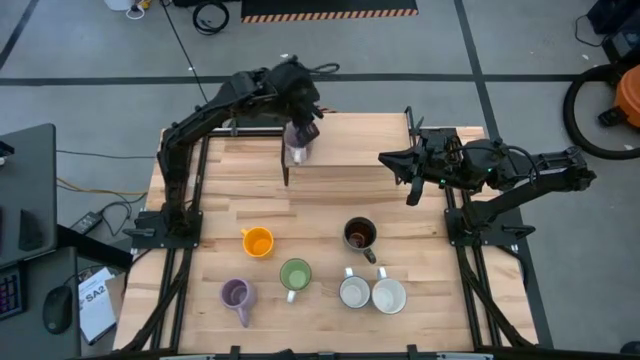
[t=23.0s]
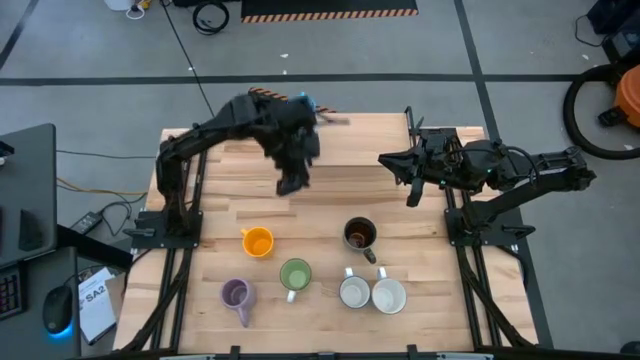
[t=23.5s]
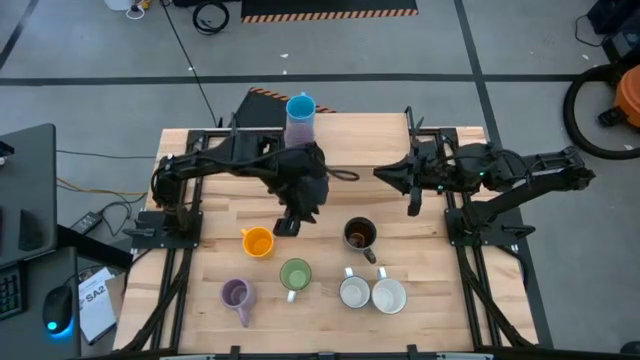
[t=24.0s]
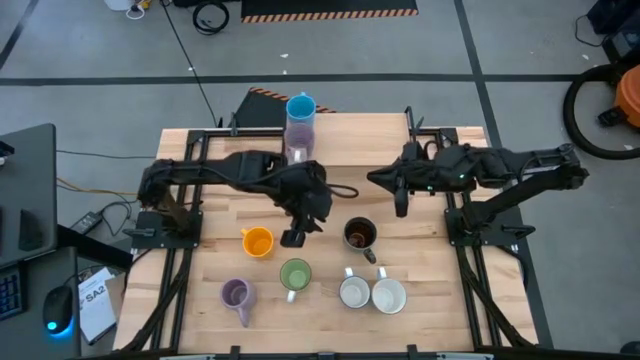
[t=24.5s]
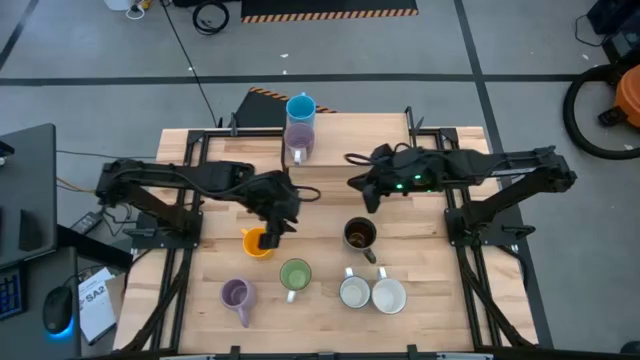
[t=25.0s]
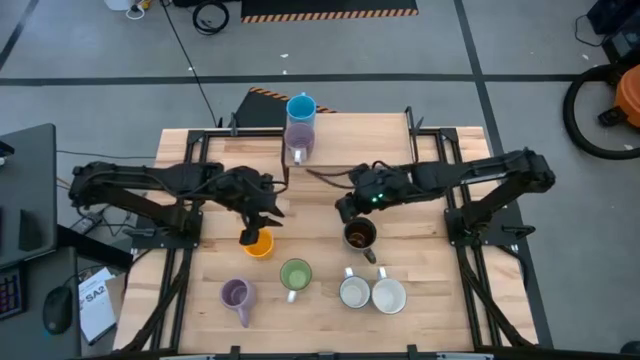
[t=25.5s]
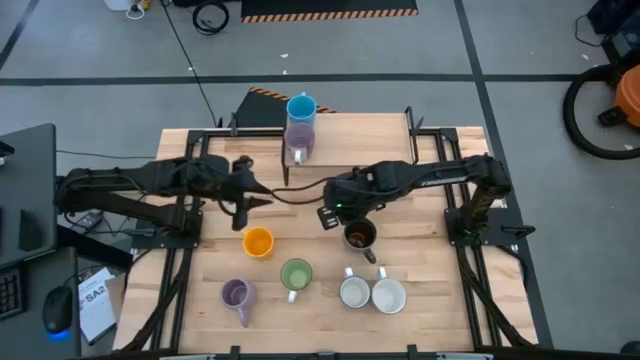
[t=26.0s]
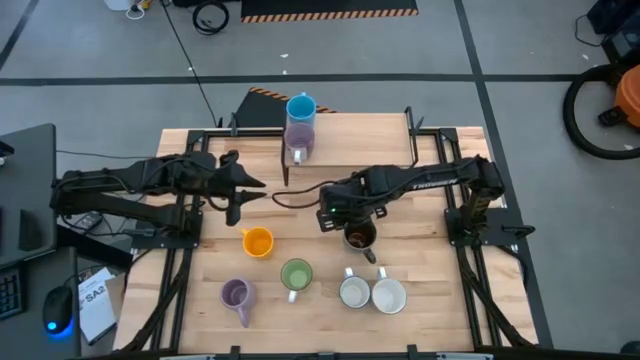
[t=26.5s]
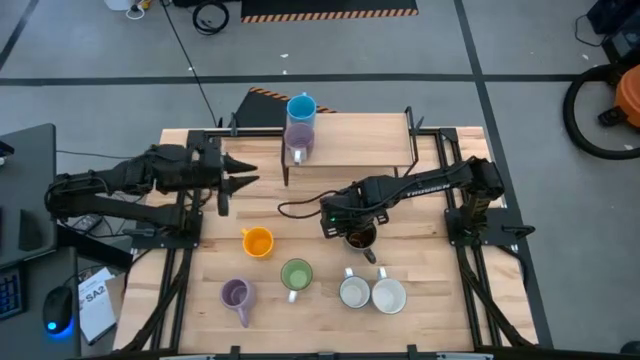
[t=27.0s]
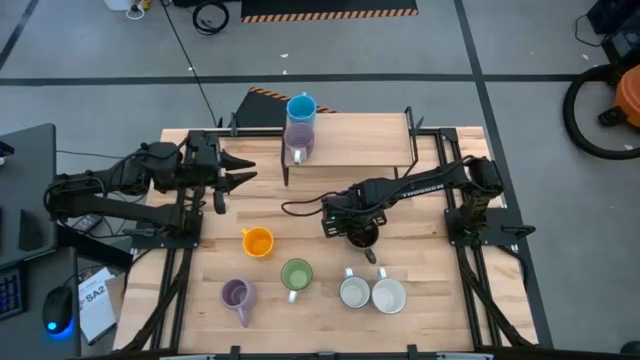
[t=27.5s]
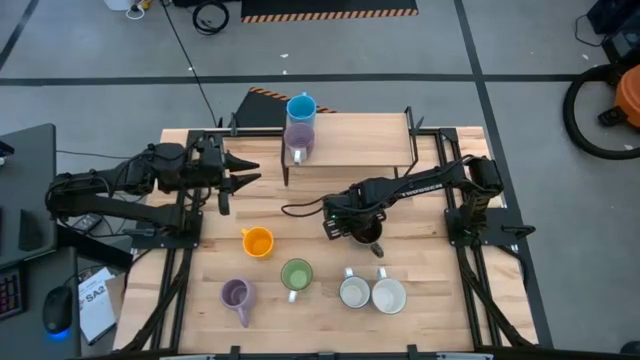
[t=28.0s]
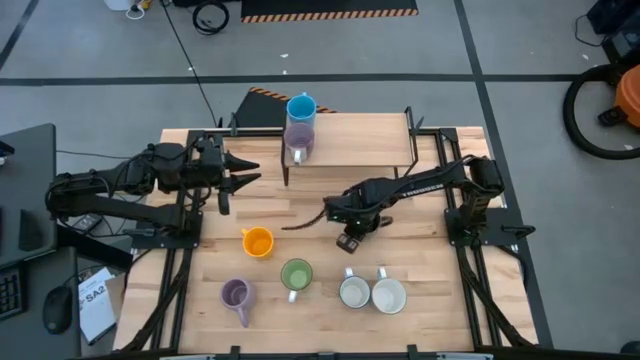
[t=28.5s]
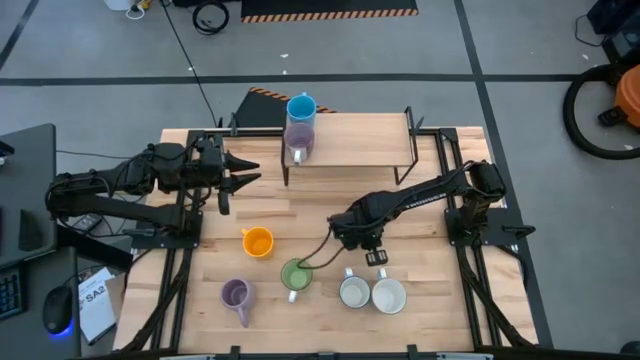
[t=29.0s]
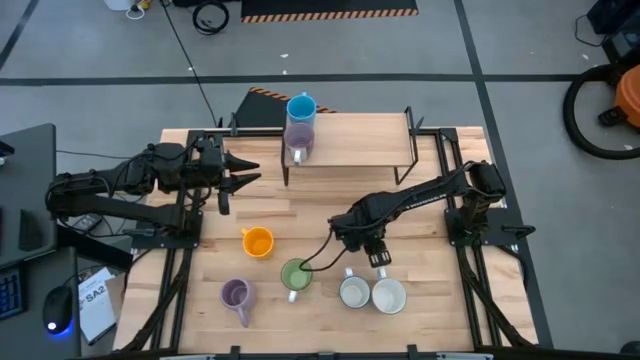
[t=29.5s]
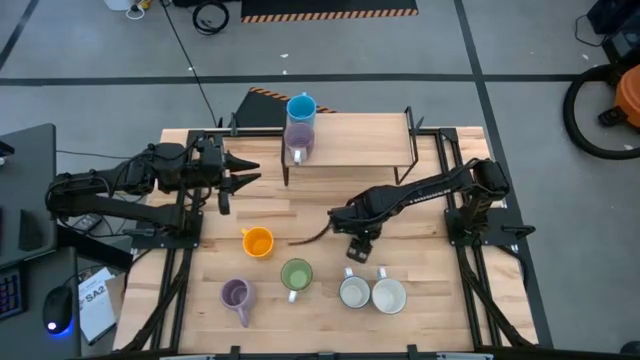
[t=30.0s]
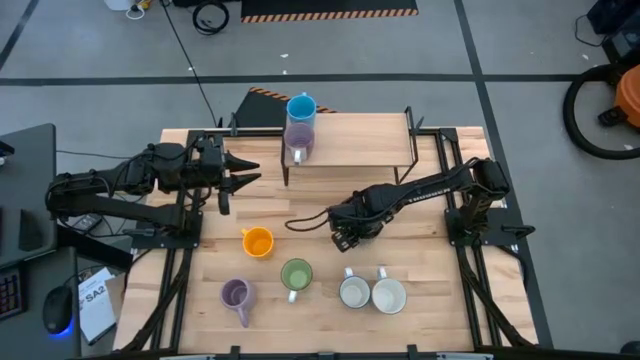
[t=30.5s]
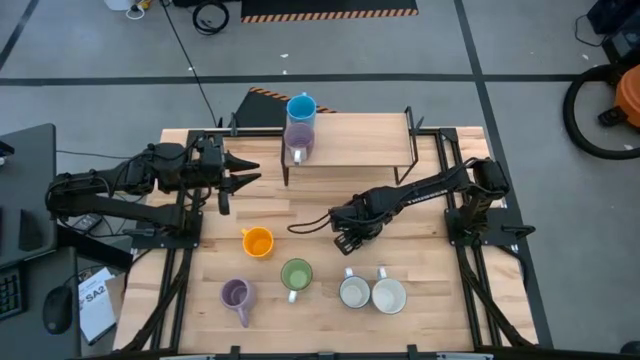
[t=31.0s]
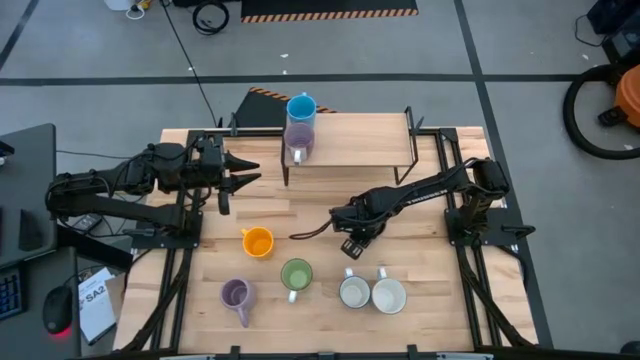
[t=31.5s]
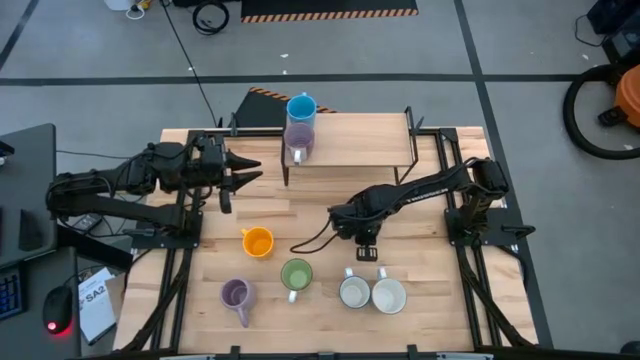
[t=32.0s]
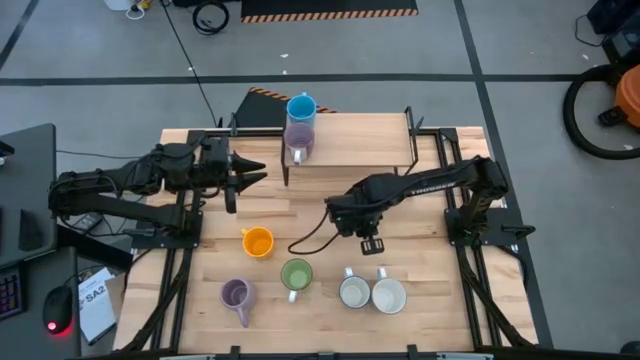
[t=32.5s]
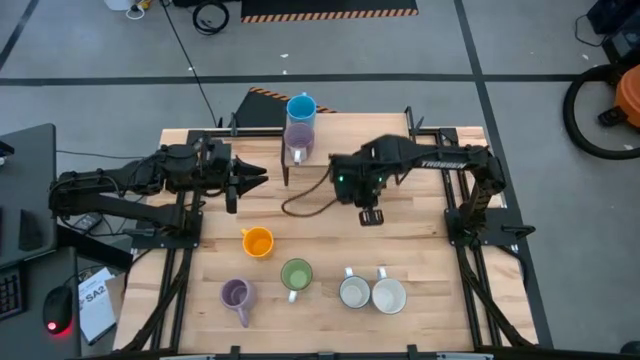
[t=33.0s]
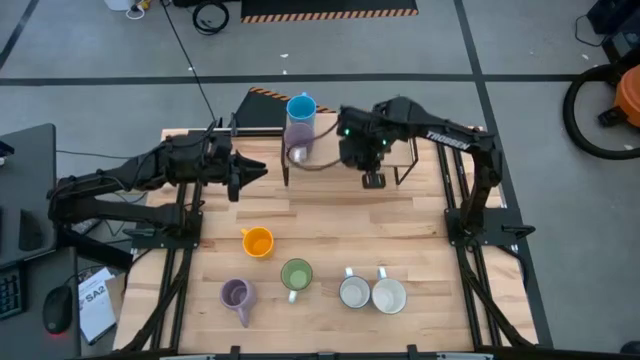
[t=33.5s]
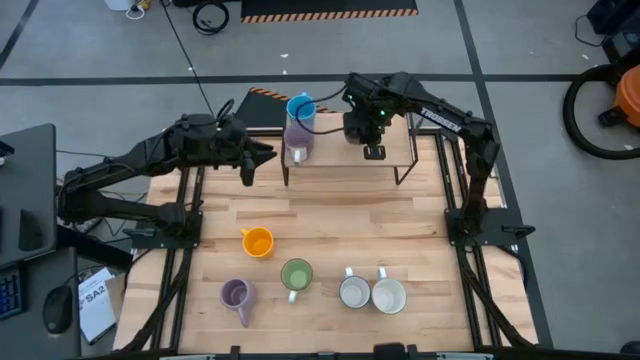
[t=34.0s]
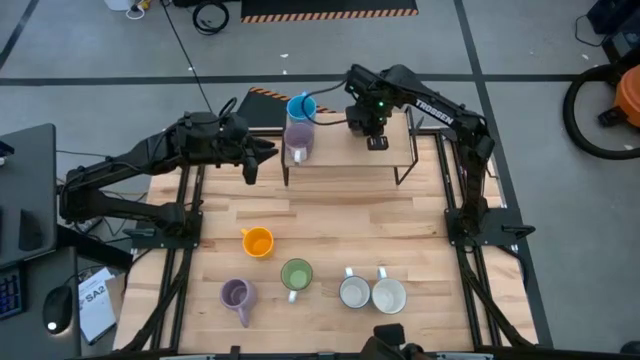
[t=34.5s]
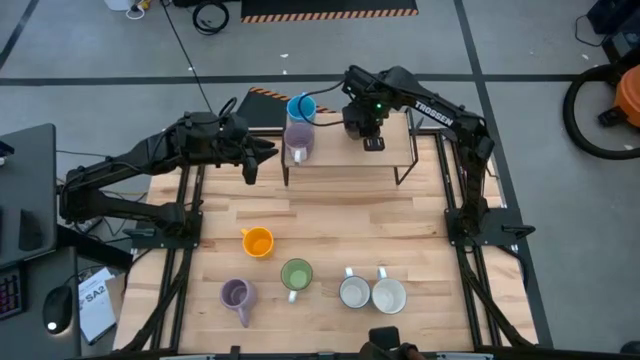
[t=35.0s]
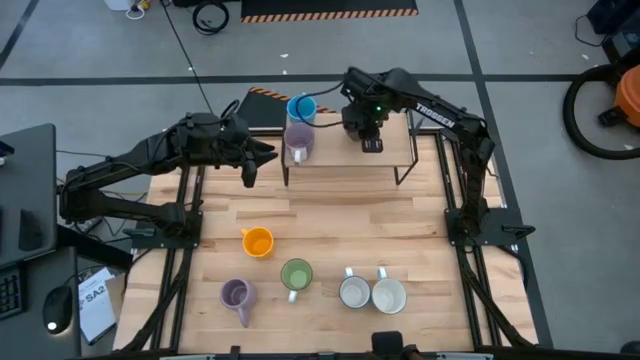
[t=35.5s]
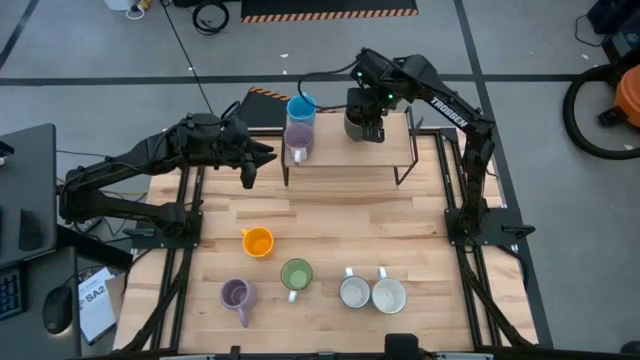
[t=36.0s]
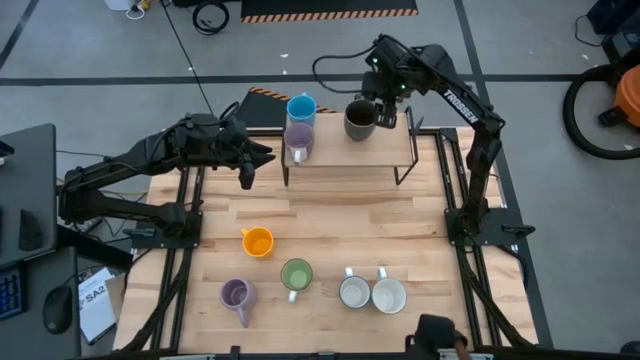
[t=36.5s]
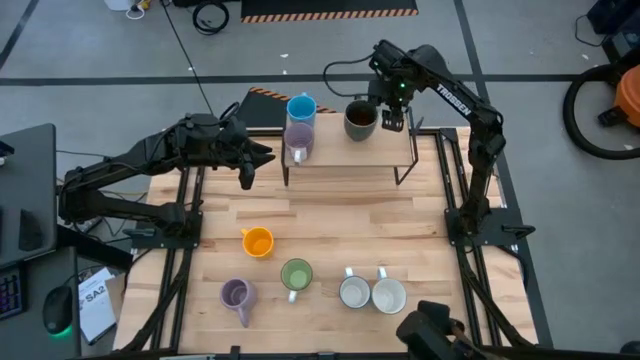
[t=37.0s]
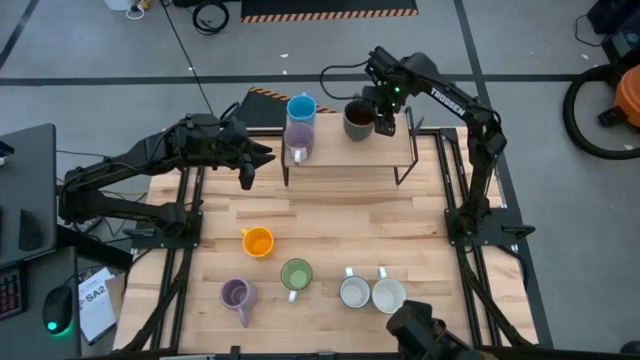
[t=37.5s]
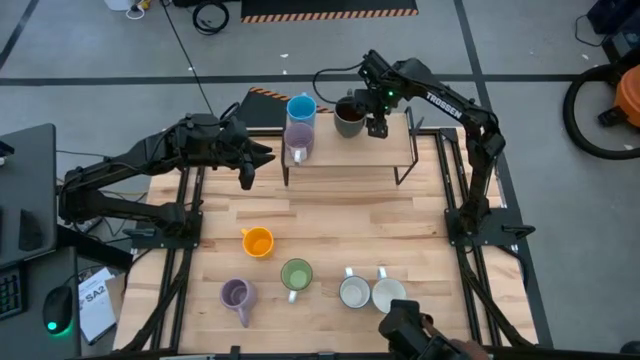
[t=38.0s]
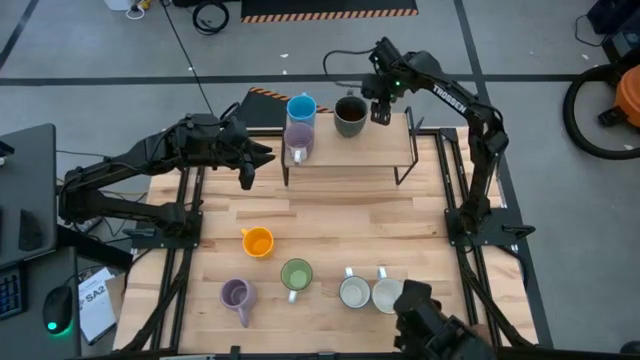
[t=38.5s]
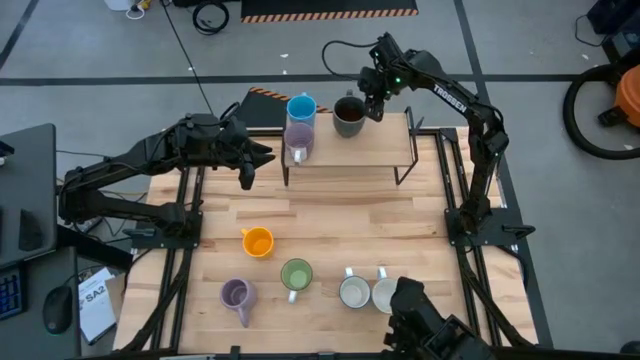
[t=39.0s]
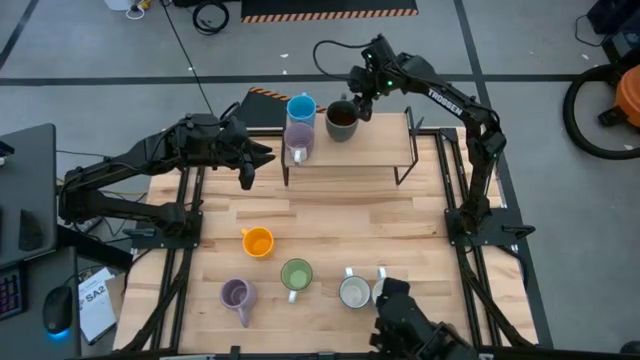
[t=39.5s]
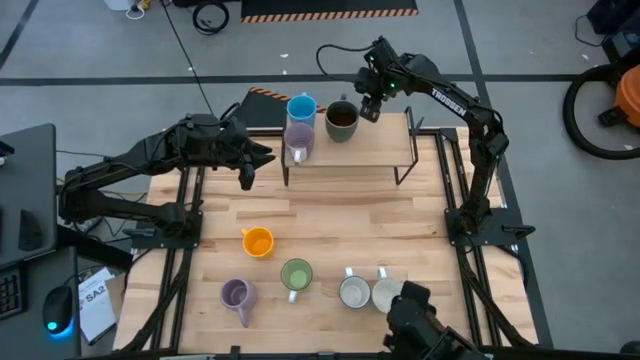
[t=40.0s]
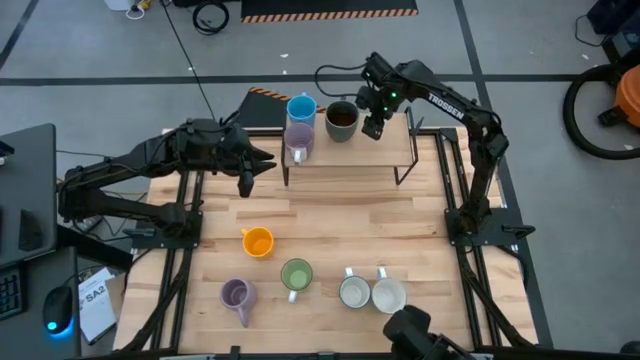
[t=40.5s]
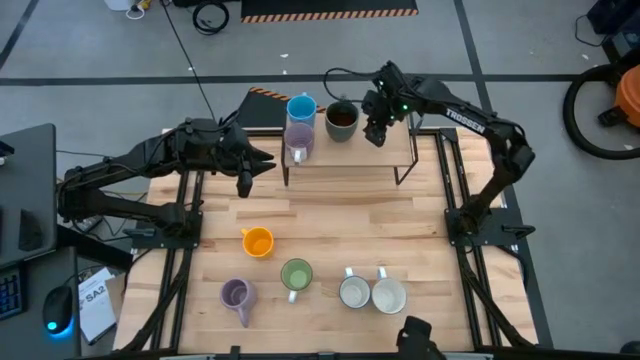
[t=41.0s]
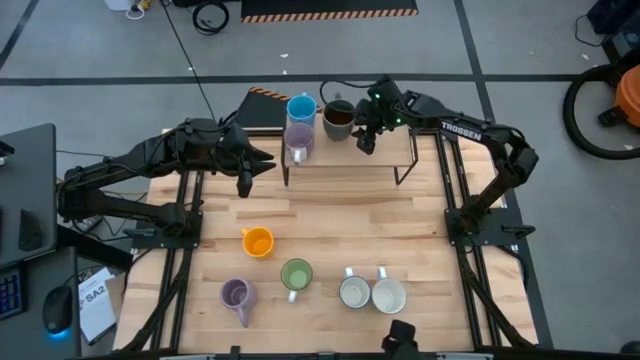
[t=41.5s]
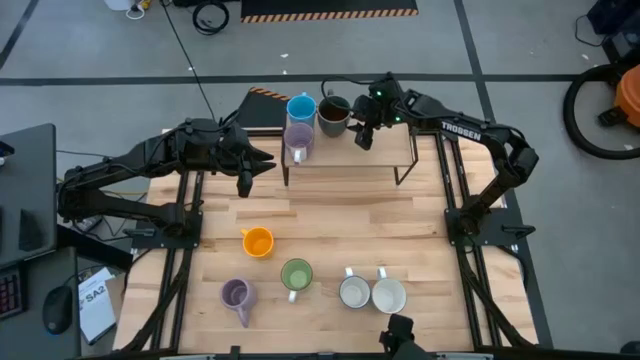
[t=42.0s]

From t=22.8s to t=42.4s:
Task: Place coffee mugs
Put the blue patterned mug on the shelf

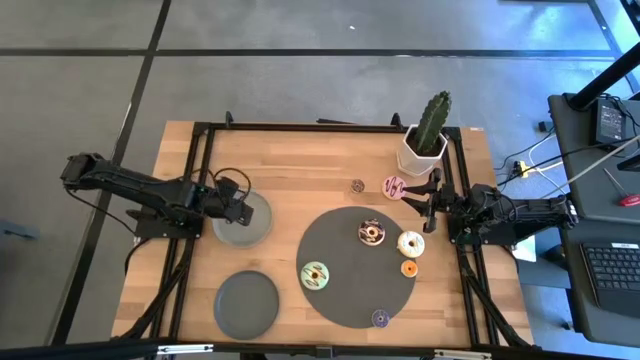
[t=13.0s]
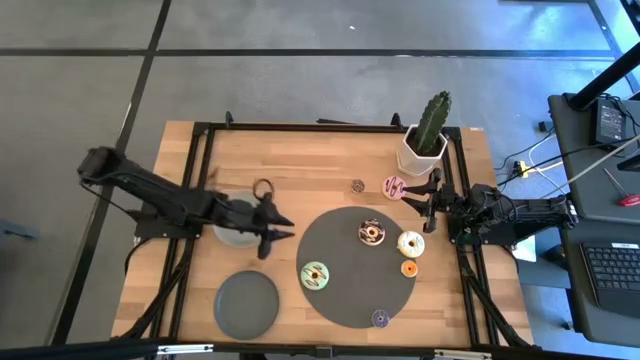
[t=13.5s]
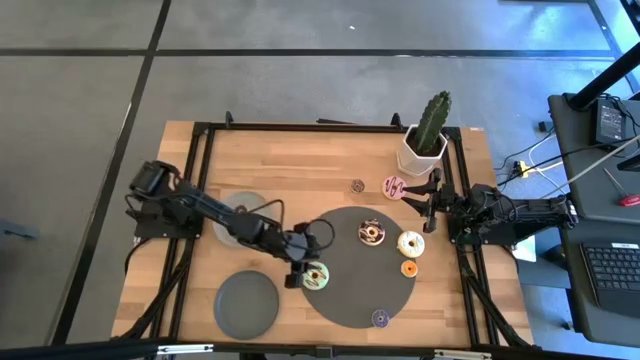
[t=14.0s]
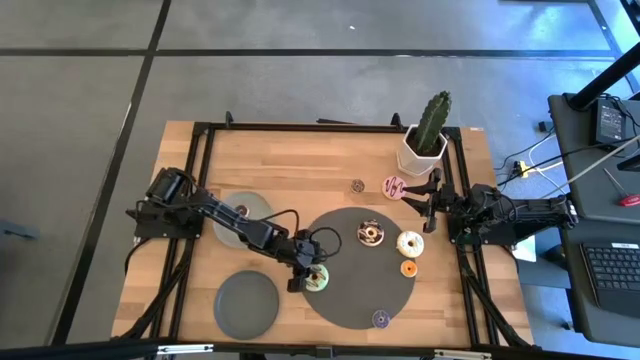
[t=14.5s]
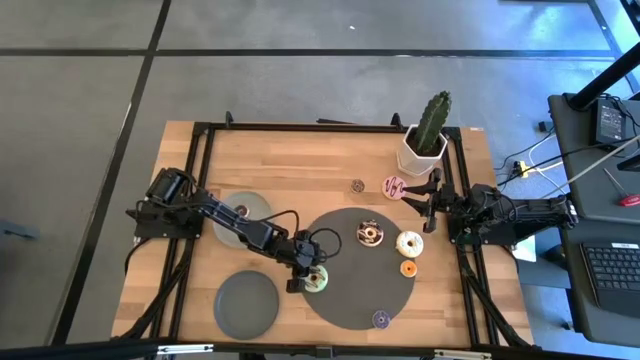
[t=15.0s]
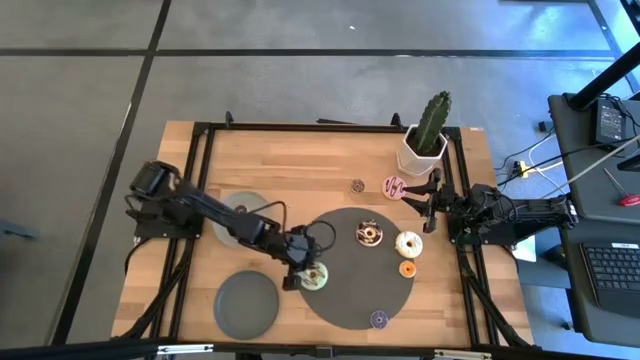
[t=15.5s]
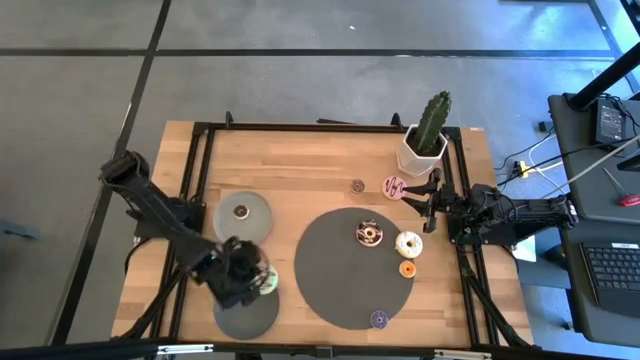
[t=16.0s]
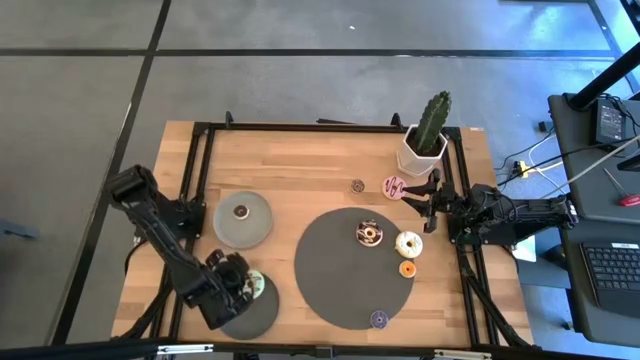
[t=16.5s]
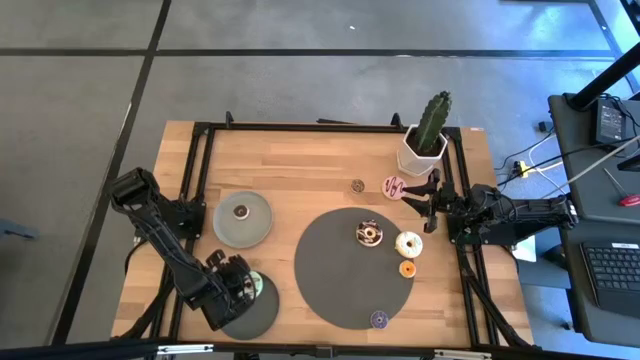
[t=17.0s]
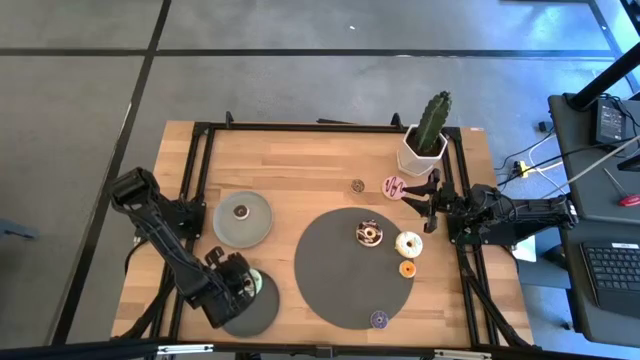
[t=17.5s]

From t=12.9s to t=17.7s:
Task: Pick & Place donuts
Put the large light green donut on the black plate
